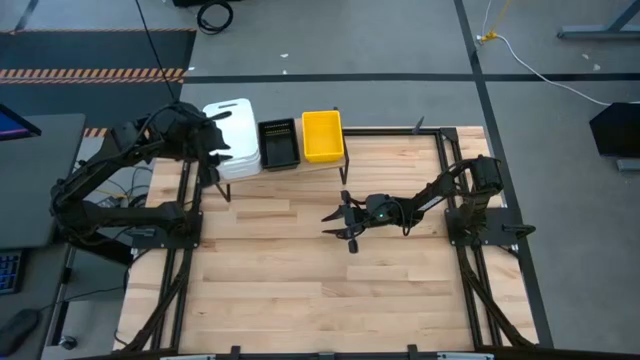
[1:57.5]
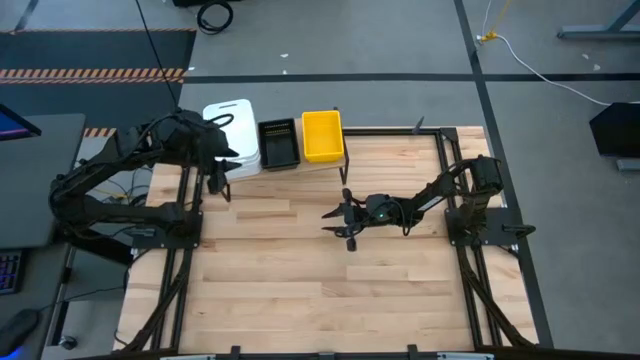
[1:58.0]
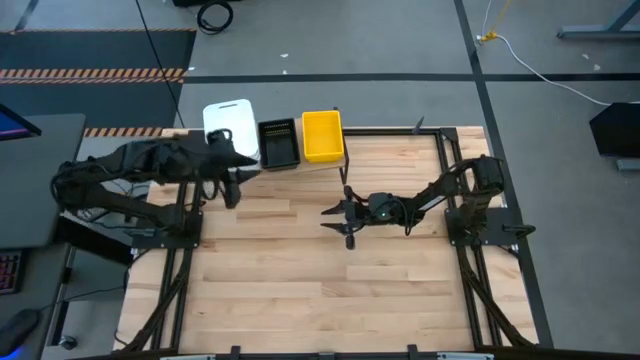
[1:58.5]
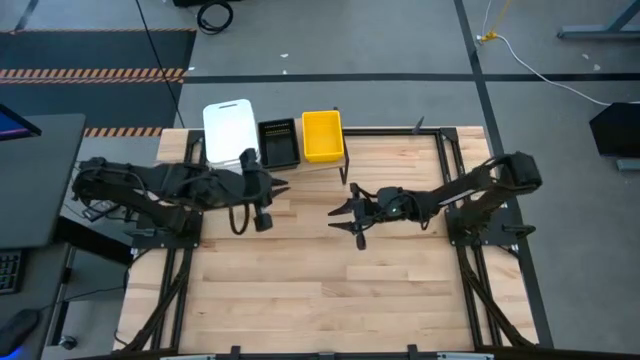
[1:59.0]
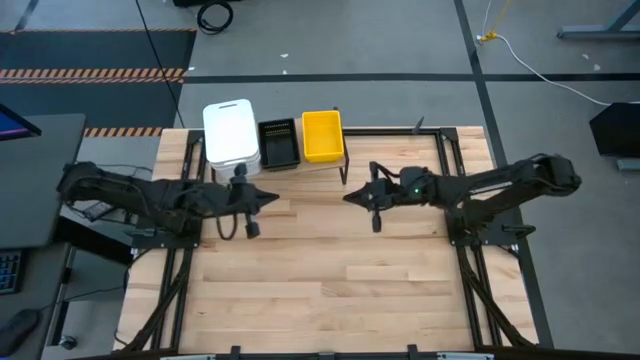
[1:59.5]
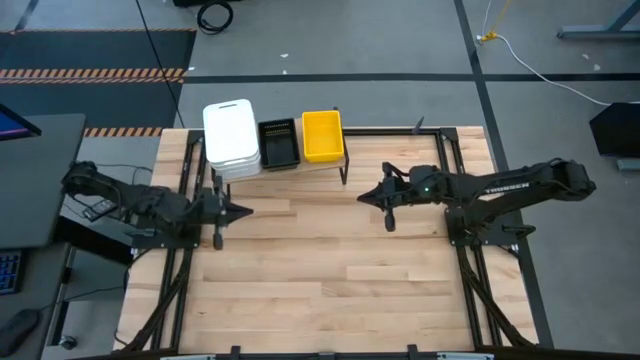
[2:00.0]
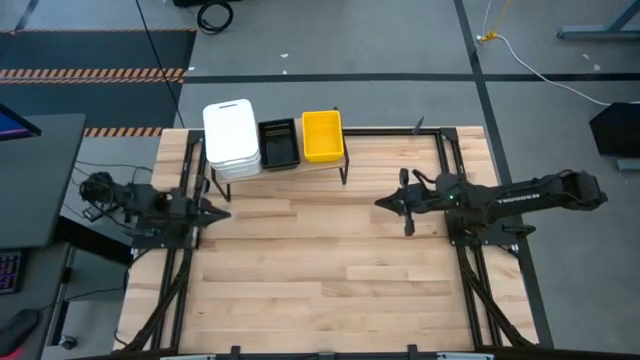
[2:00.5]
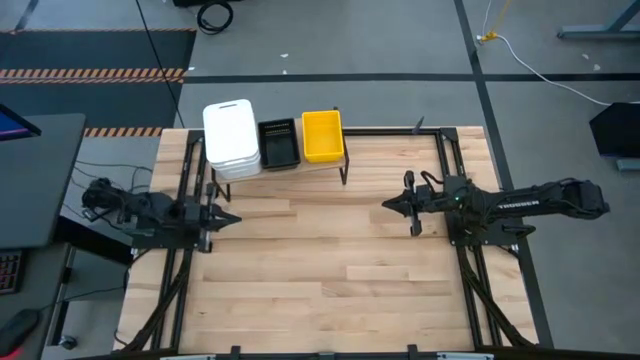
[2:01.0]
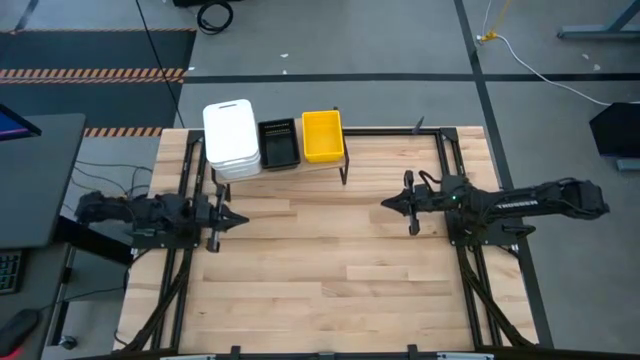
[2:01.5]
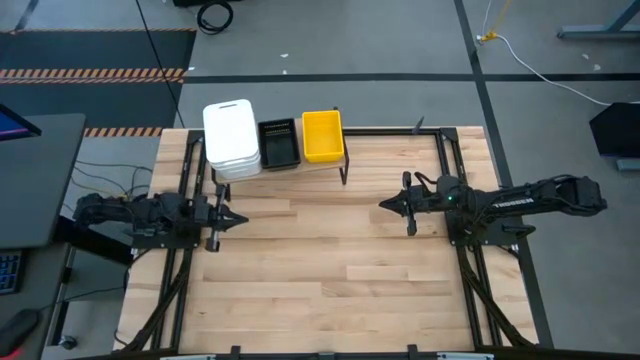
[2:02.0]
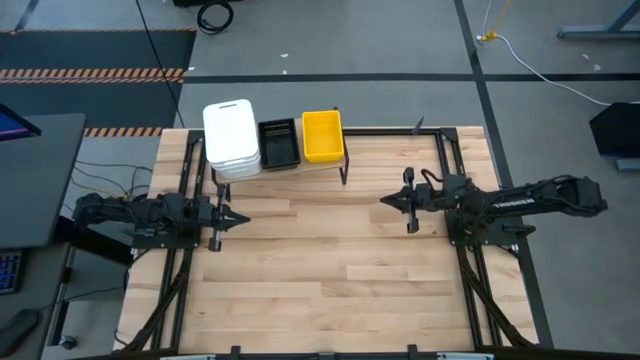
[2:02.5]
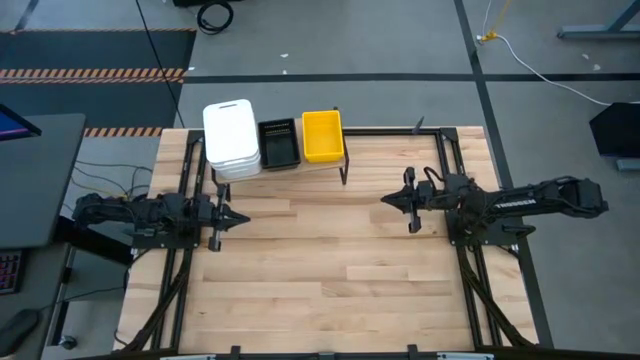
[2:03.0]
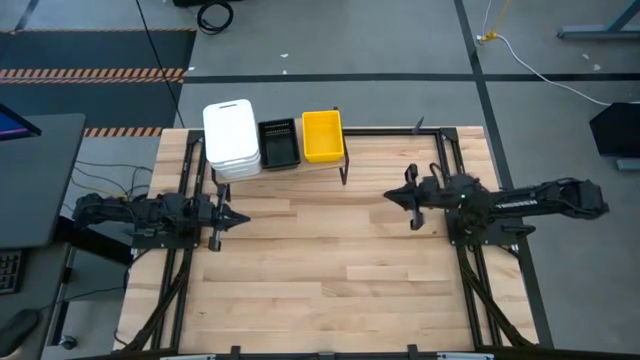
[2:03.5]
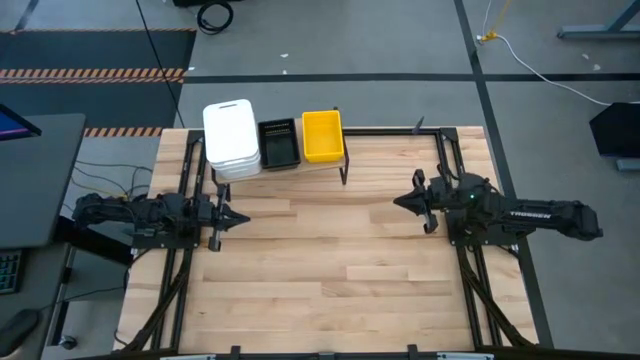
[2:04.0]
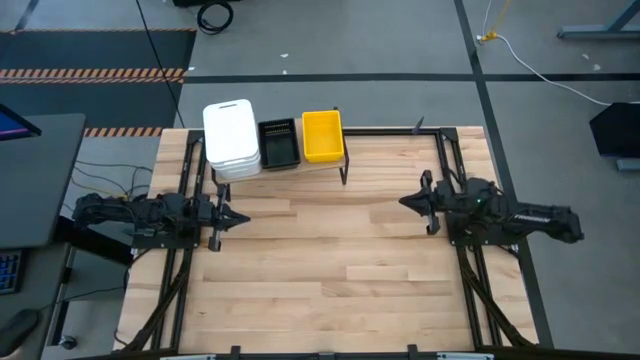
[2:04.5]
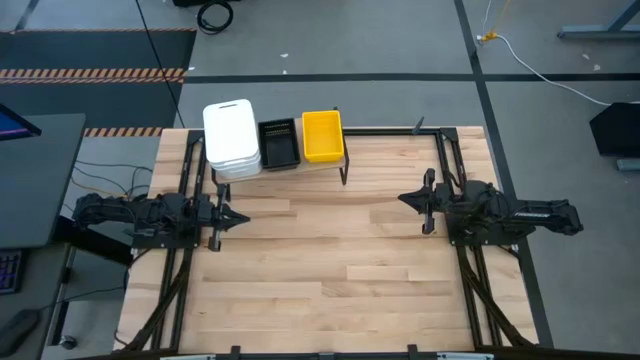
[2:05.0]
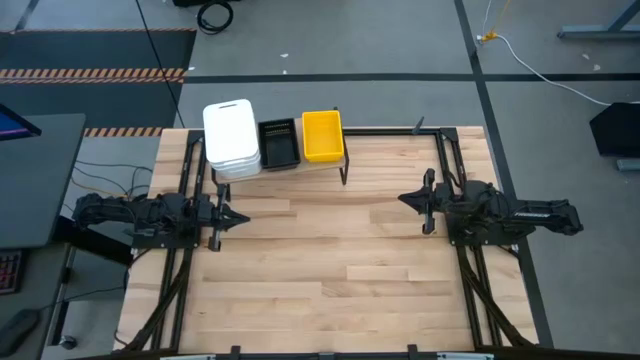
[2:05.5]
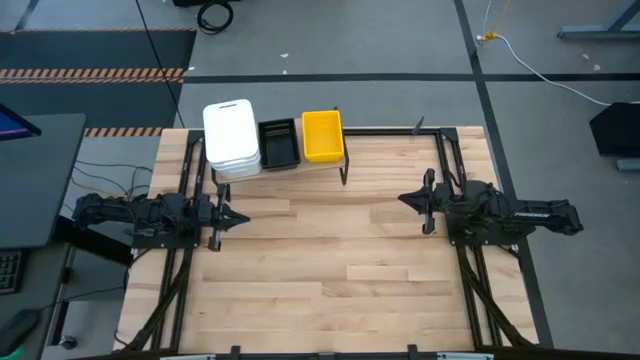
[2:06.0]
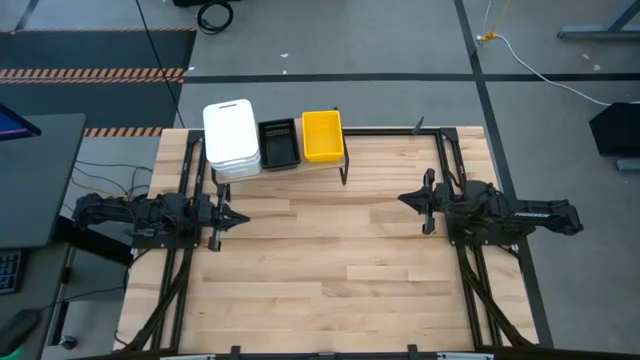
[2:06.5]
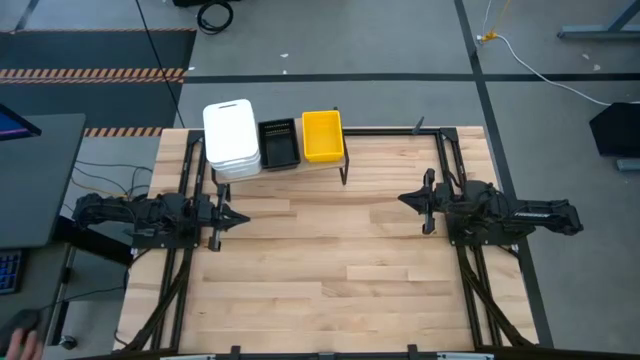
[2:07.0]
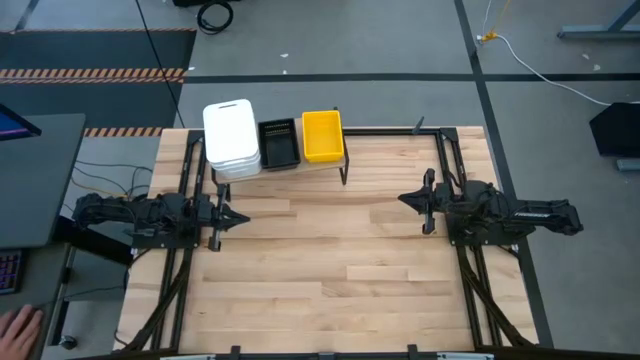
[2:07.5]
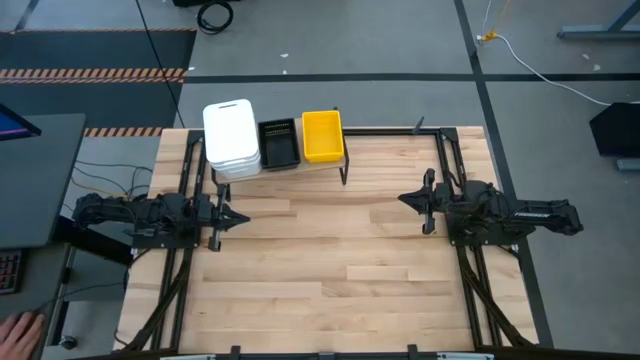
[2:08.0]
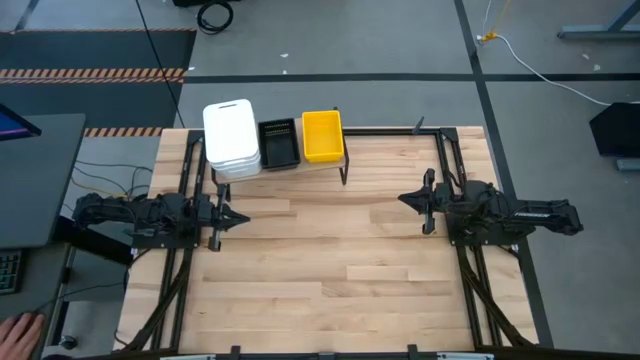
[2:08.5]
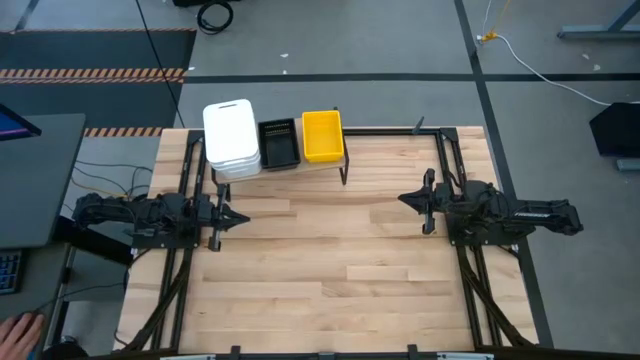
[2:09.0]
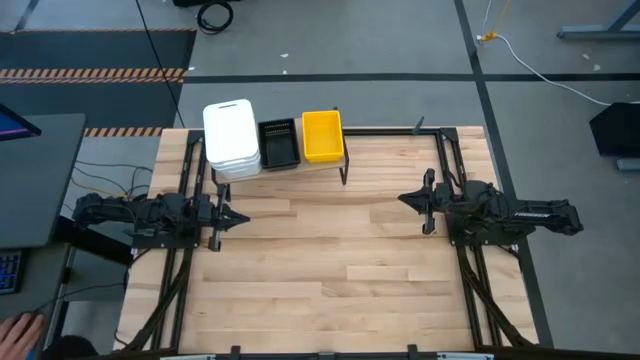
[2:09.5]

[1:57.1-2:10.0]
Task: Stack baskets on shelf by color
Return to Home Position

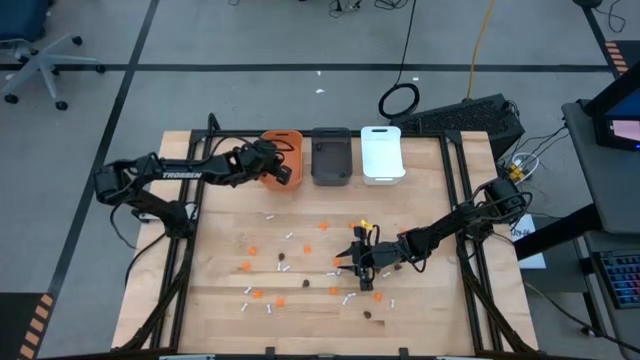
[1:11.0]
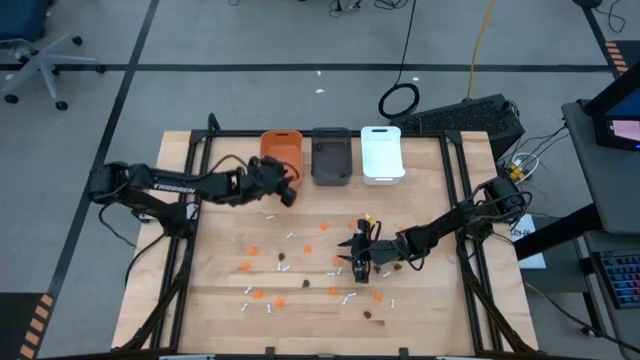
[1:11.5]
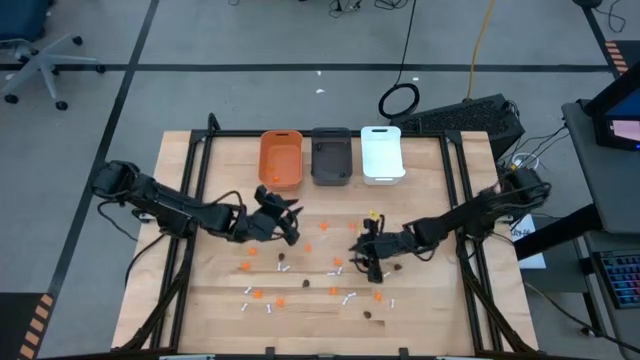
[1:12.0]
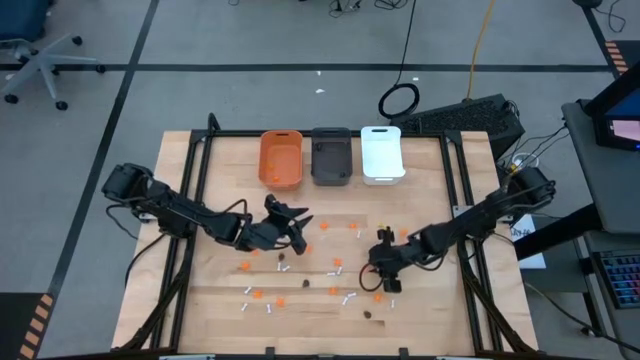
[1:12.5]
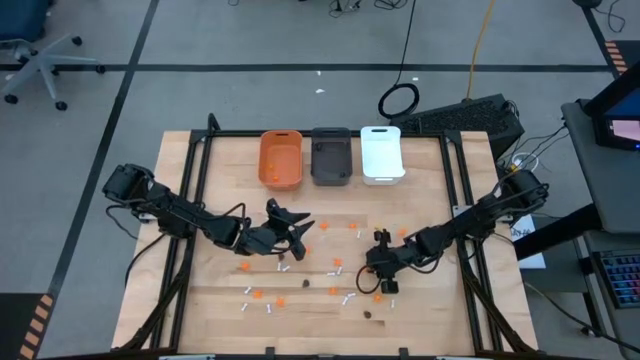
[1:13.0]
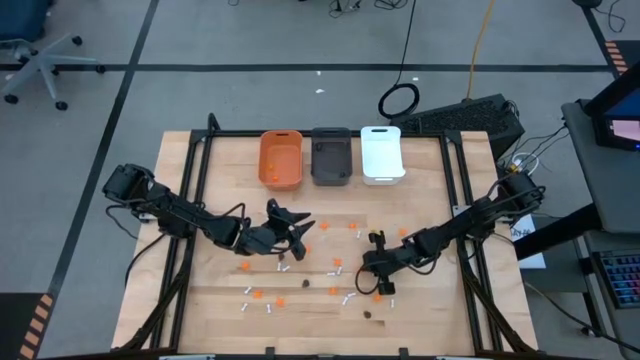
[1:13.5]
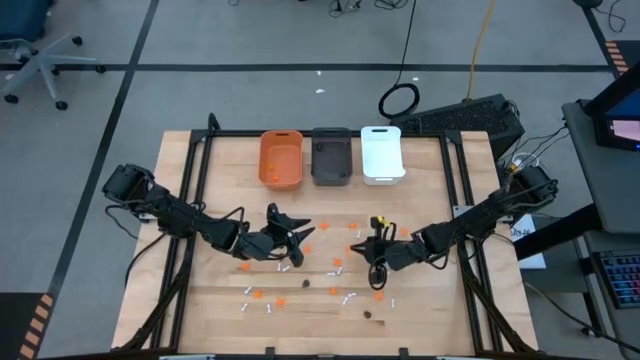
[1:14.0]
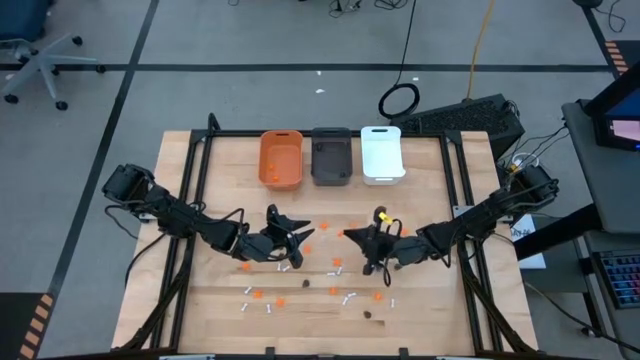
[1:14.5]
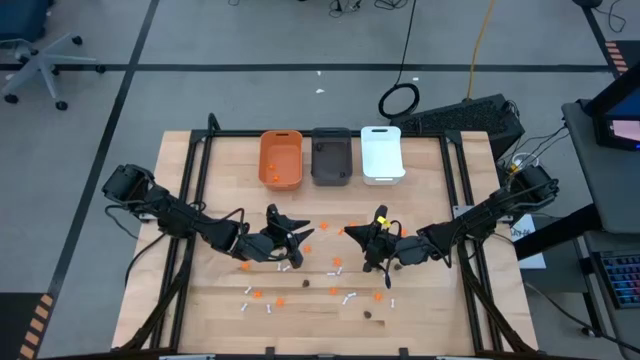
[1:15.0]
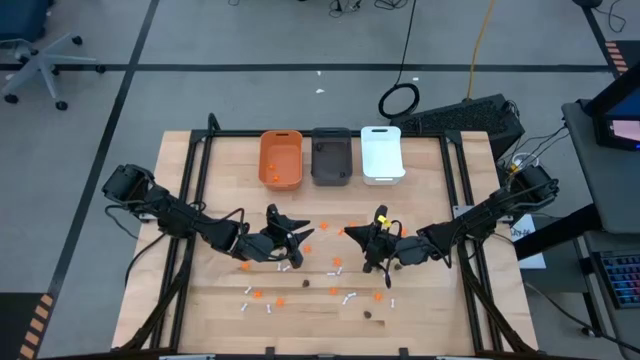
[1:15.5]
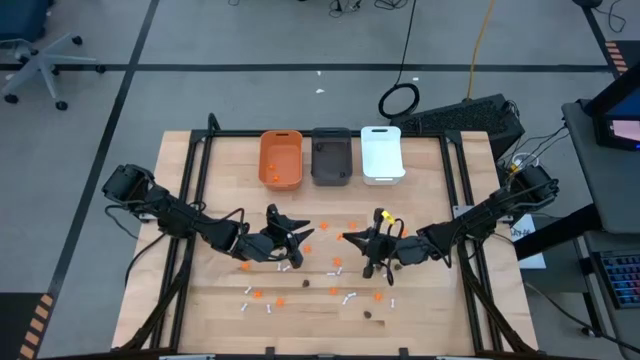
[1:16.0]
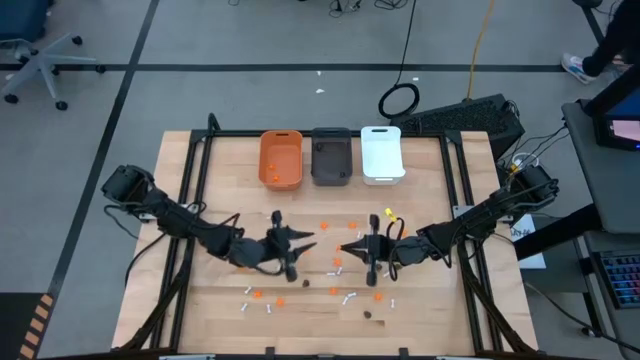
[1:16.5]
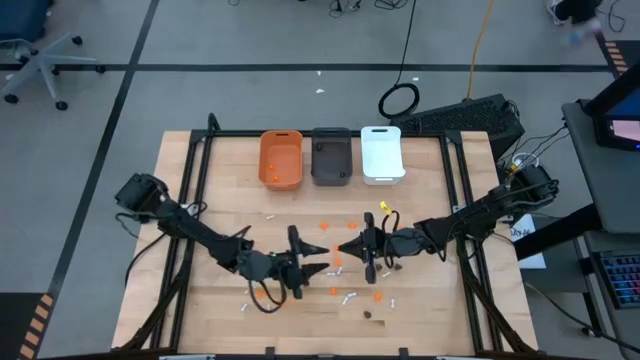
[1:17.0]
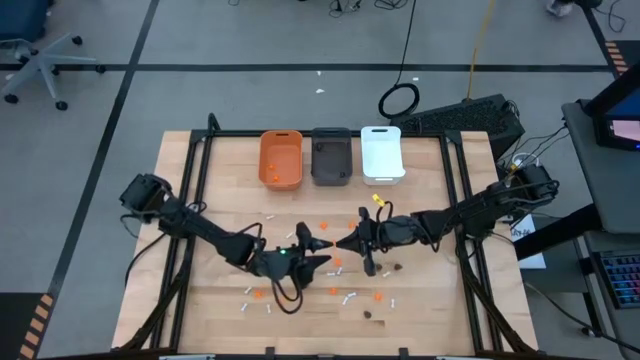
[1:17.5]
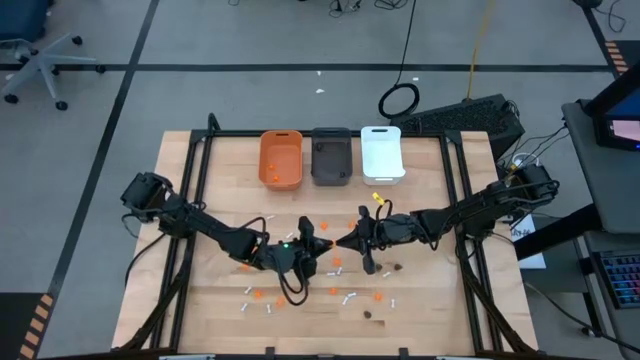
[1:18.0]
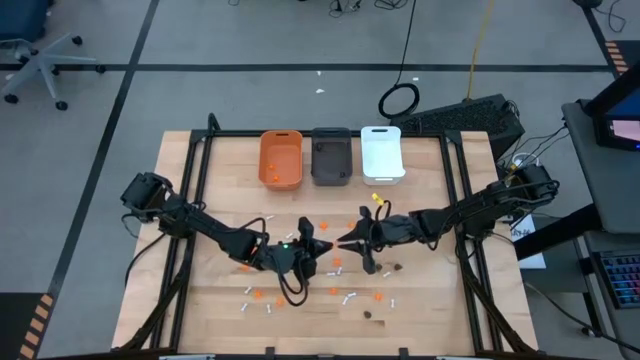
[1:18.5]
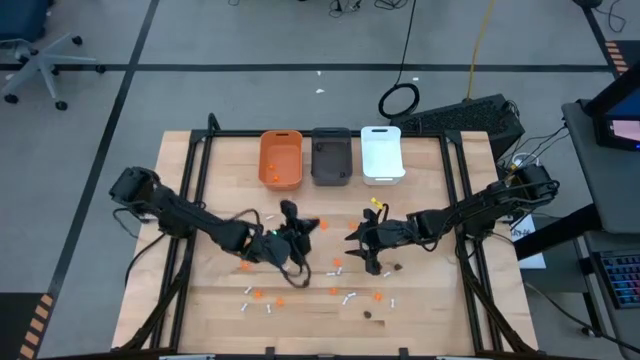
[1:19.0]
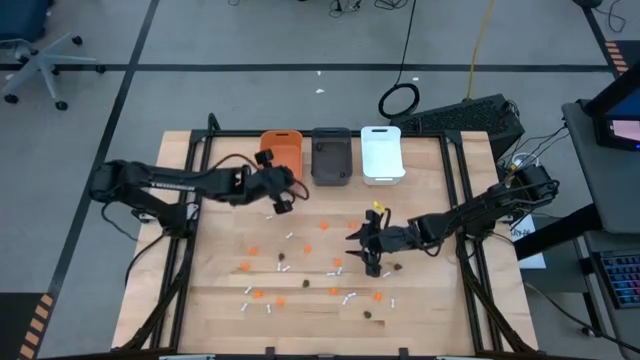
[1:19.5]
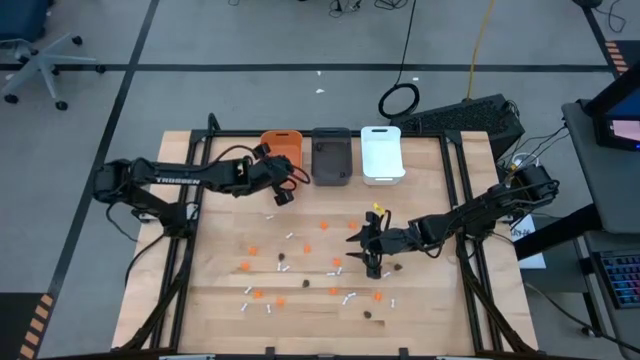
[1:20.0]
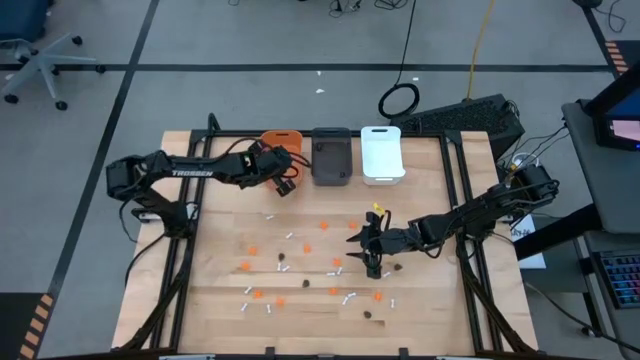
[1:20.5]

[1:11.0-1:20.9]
Task: Sort Halloween decoration
Put the orange spider toy into the orange bin
